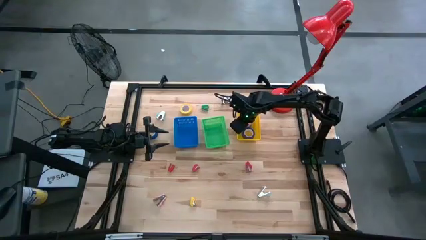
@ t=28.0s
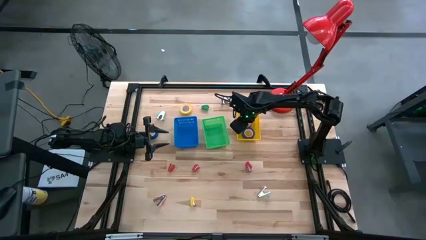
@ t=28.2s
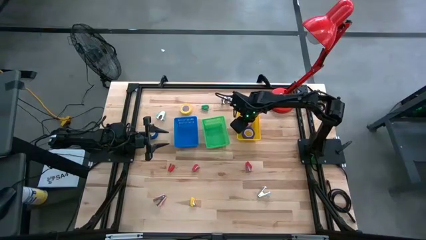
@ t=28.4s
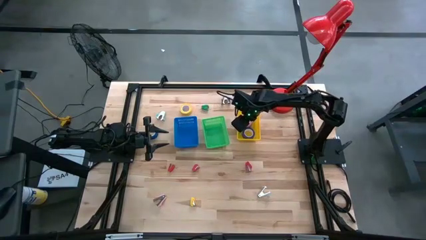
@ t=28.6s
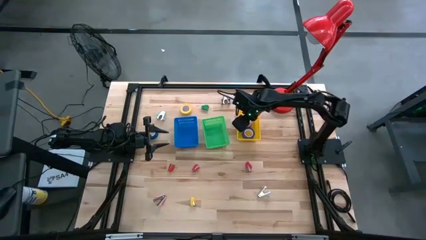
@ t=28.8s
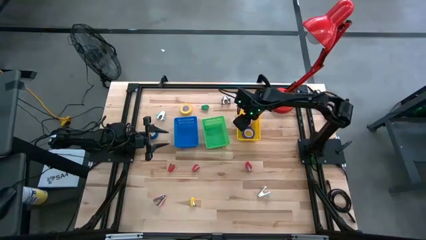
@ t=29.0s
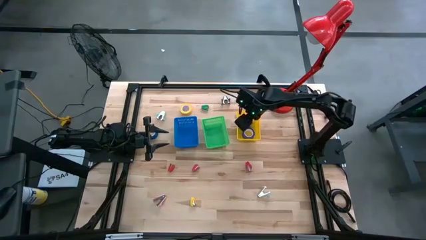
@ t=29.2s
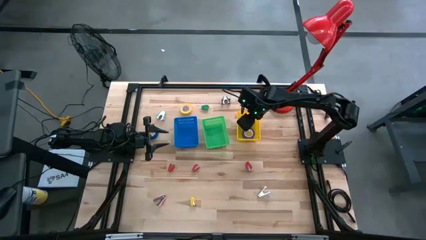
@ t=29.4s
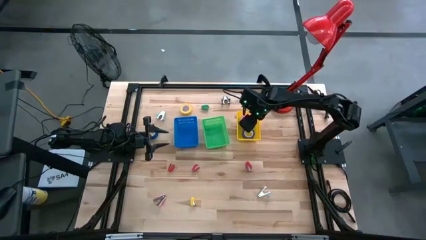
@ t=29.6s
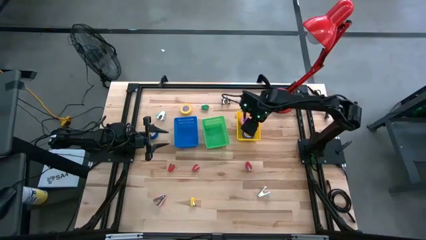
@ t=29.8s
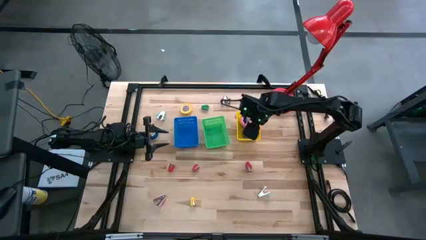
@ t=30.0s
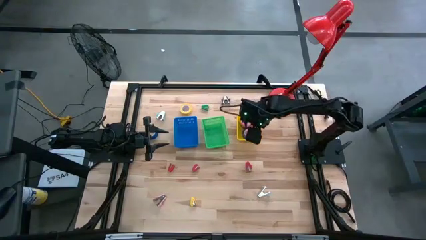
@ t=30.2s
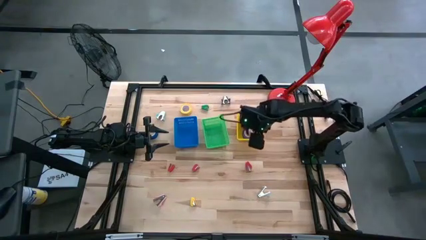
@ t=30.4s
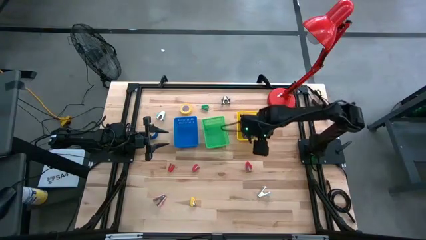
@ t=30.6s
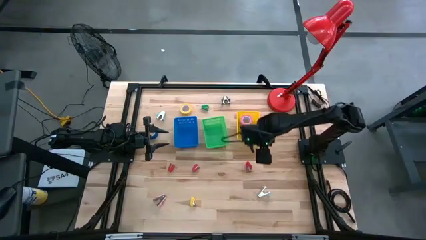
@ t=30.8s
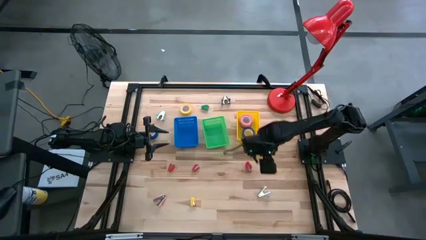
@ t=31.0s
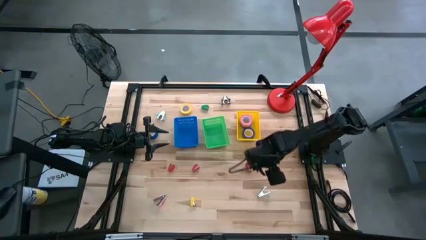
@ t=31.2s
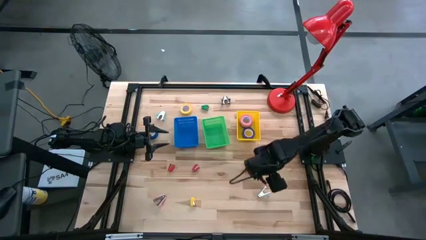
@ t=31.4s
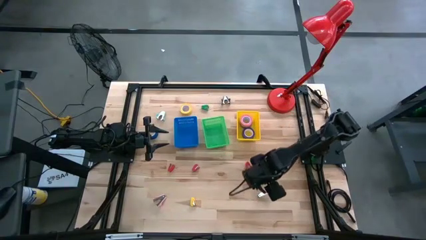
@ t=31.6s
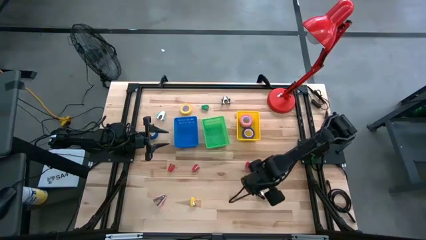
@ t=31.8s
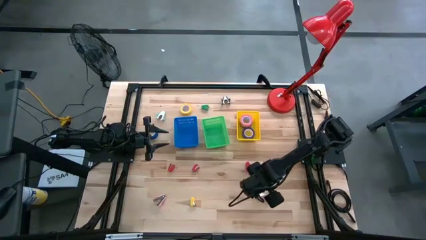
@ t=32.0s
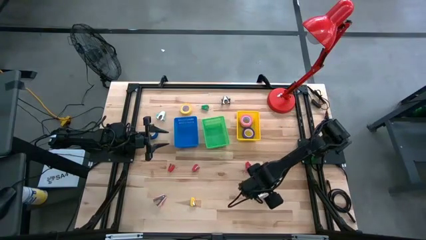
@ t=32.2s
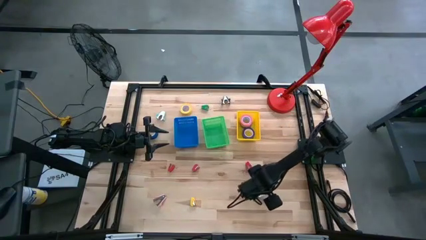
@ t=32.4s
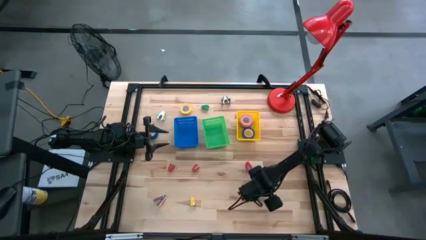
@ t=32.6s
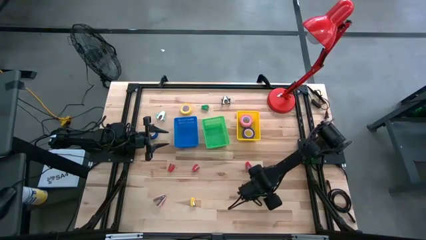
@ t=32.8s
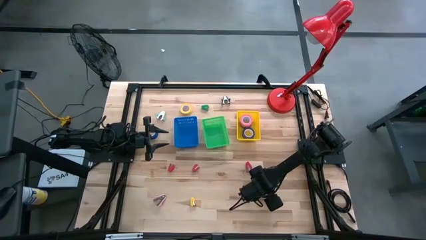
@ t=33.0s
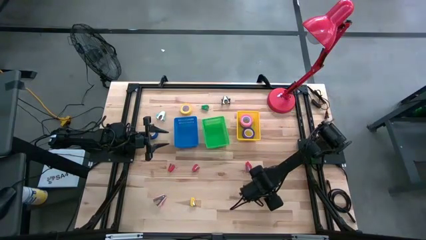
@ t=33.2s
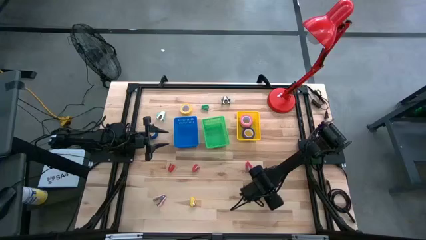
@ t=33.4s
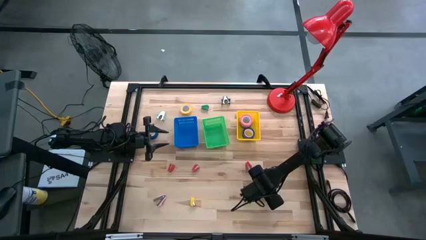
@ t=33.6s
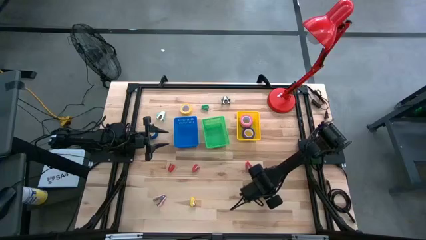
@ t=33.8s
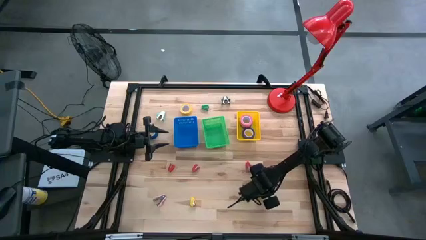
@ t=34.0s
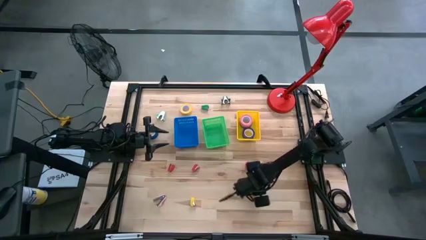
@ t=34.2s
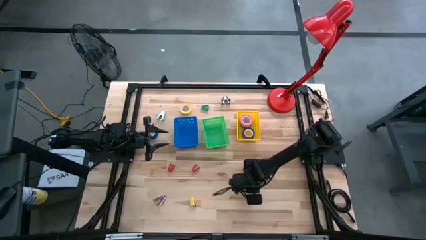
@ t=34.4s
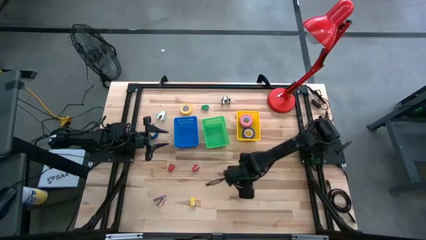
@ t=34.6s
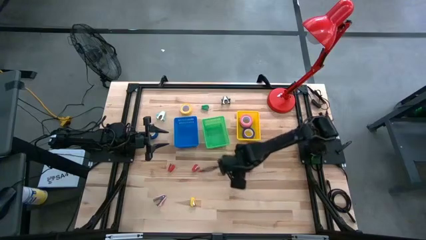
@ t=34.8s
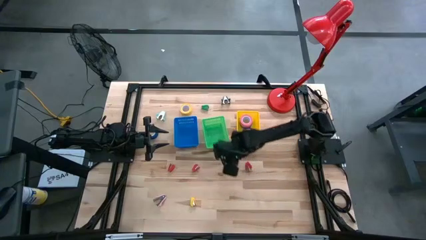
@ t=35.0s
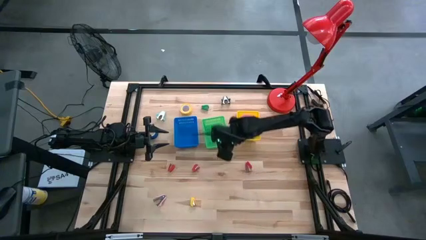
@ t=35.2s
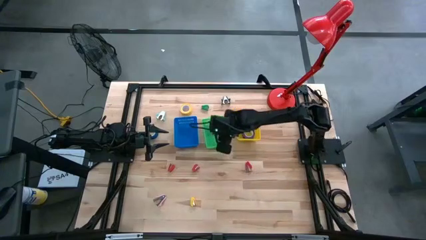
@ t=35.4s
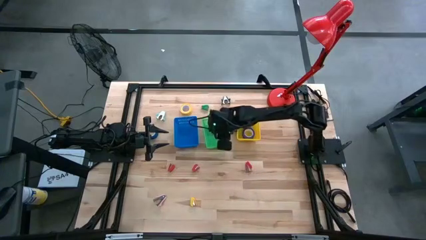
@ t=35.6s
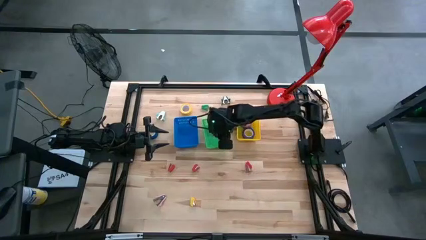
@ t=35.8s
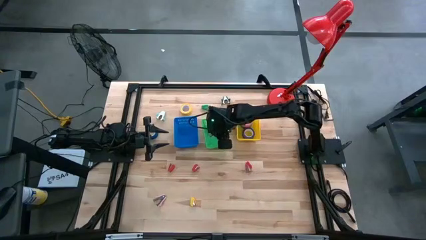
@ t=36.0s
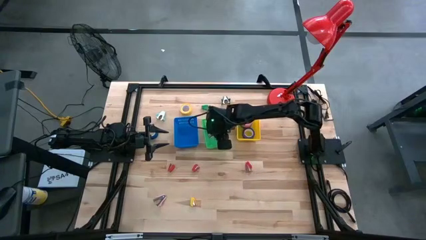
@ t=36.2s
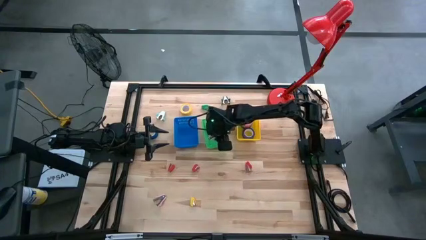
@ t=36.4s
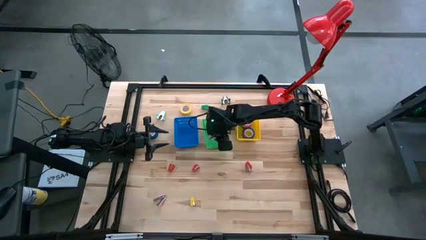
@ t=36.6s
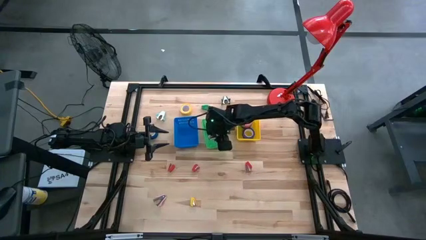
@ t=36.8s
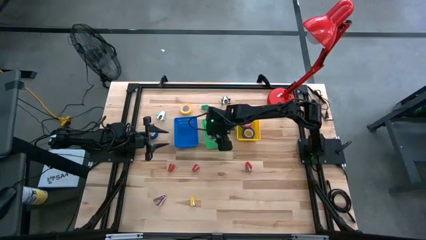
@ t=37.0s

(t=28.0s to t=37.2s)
Task: Pick and place Stapler, Stapler remover, tape
Put the white staple remover into the green bin

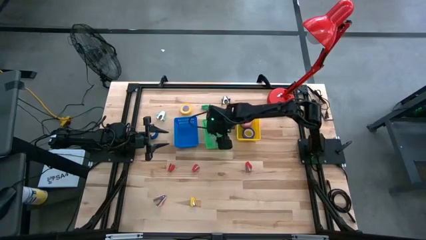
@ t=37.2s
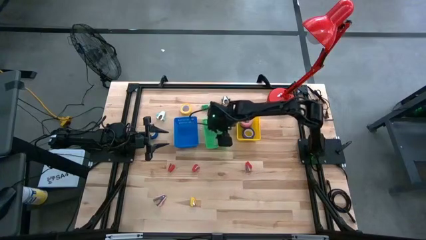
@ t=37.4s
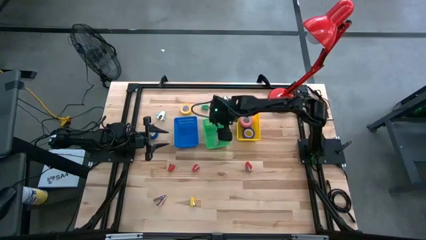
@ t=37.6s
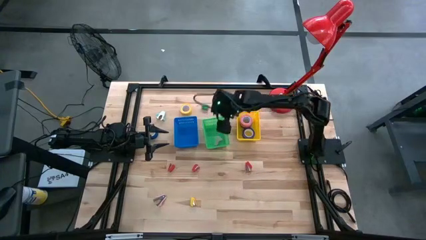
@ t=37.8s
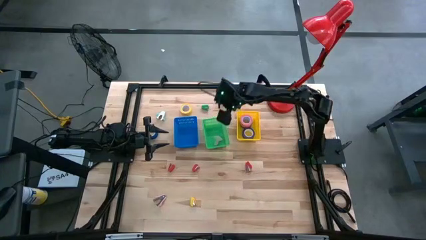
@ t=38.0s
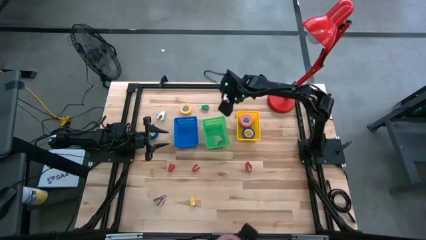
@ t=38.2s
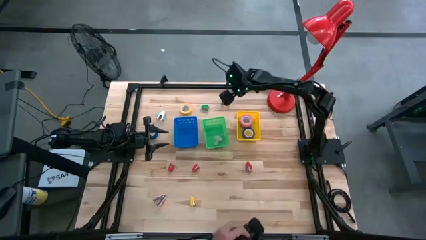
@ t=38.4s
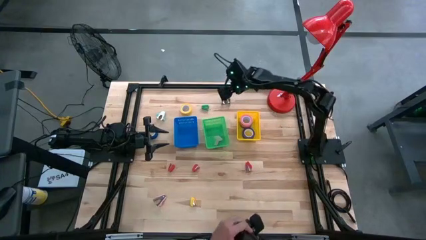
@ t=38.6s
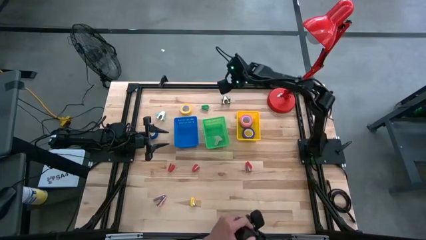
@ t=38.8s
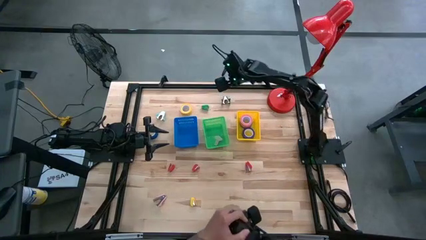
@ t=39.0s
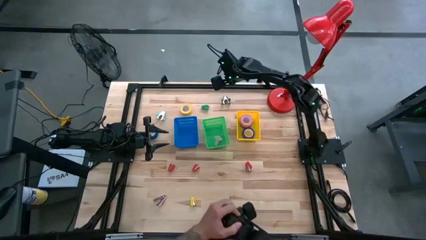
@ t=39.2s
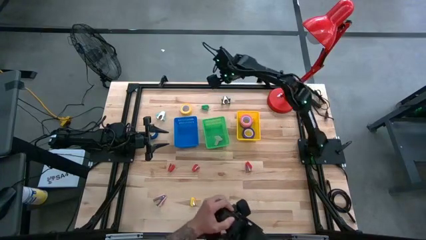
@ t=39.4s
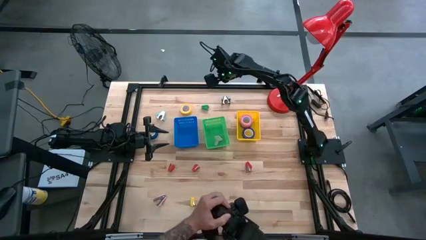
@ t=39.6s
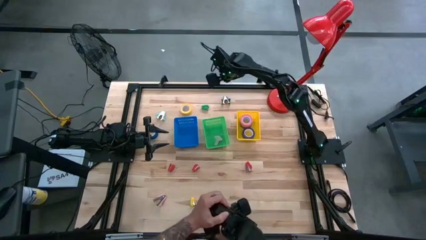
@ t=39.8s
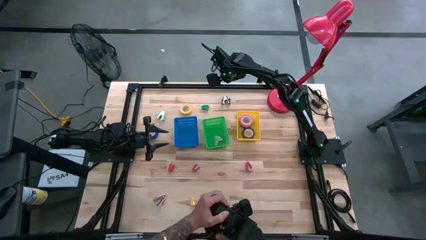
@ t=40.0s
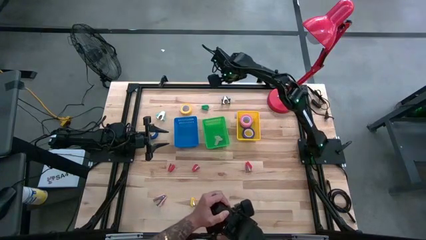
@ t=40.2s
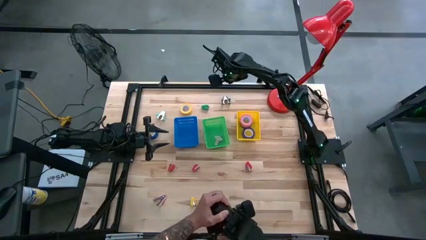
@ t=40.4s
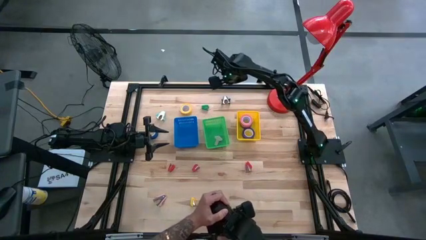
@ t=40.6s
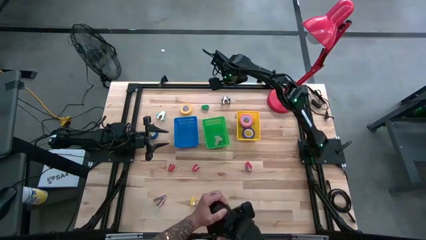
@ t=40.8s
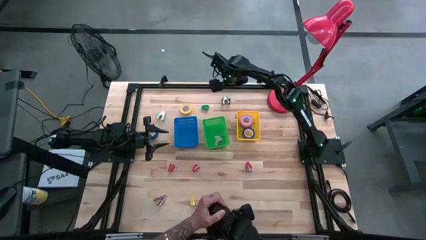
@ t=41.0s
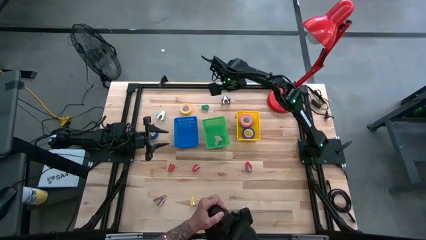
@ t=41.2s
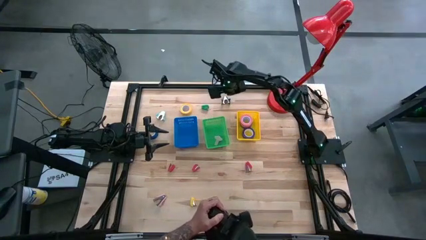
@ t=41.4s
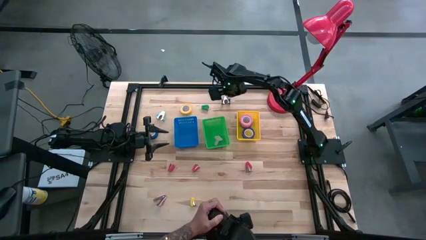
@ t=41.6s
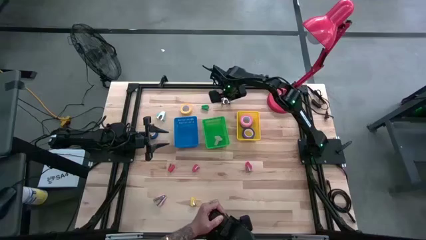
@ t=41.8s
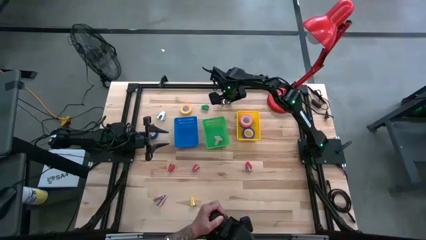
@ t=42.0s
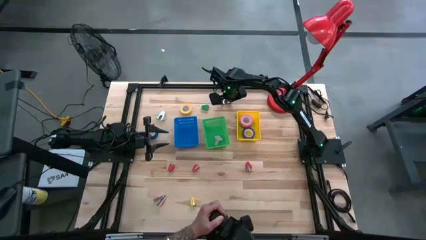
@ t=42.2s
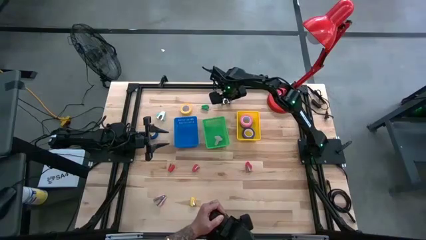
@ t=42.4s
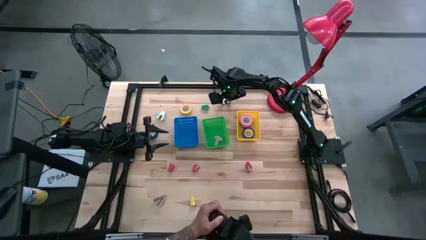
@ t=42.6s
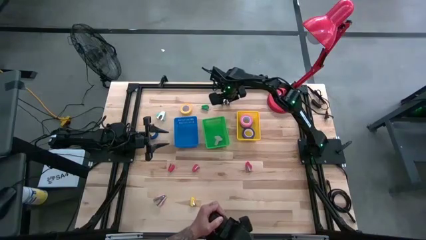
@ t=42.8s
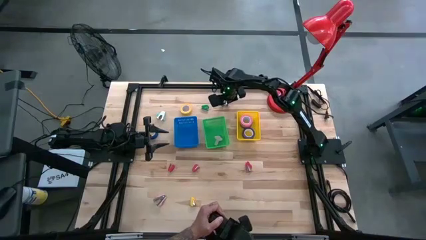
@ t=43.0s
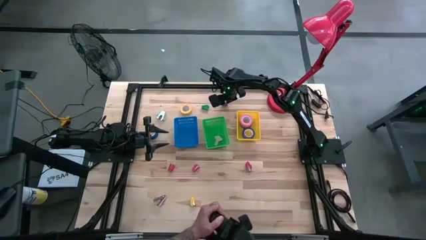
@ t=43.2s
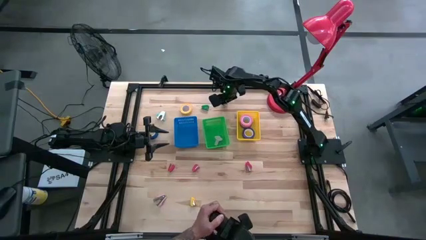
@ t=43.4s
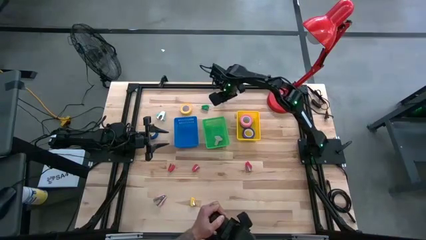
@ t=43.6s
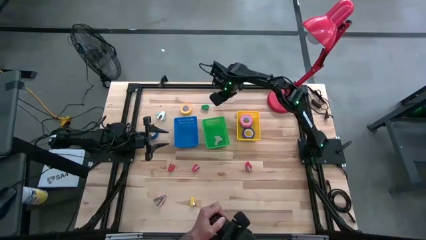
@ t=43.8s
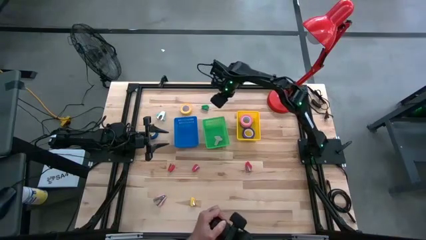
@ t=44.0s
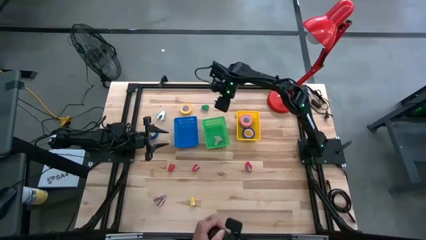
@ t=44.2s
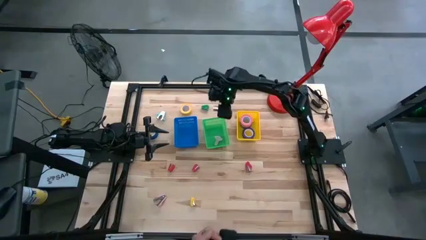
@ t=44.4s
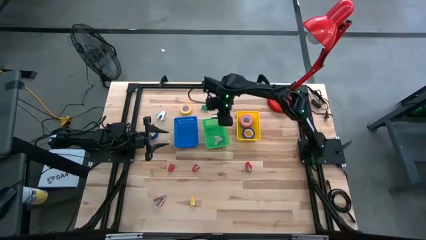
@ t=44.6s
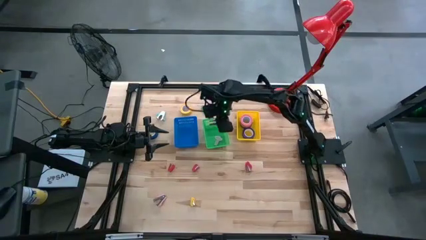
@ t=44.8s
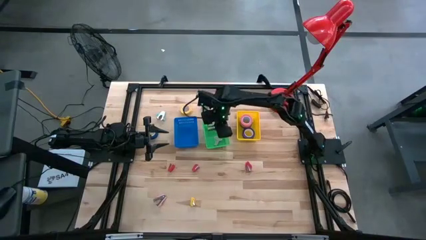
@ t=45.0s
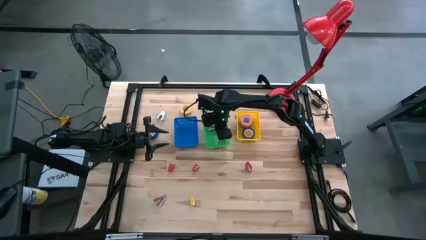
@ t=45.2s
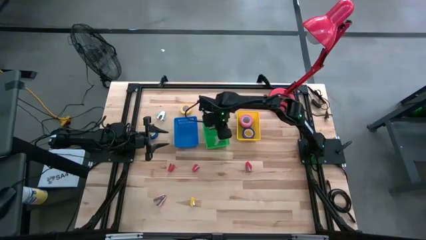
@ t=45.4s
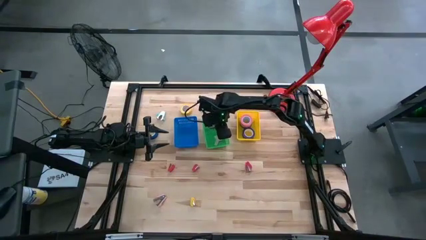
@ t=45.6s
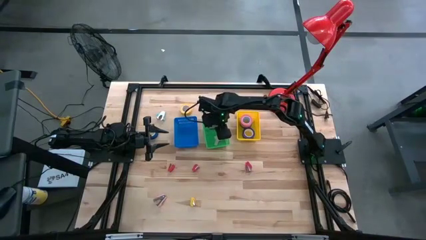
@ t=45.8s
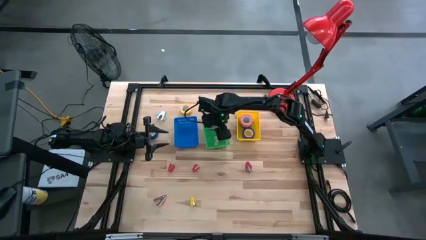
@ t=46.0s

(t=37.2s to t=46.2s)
Put the black staple remover into the green bin
